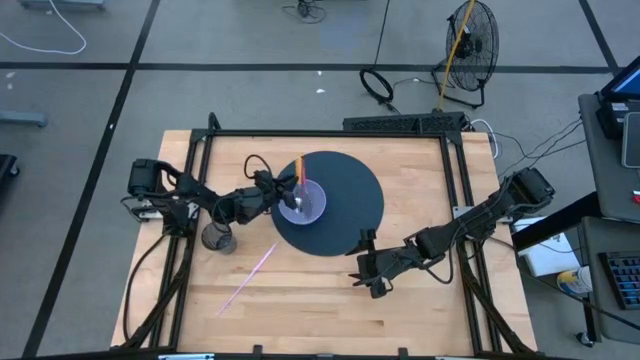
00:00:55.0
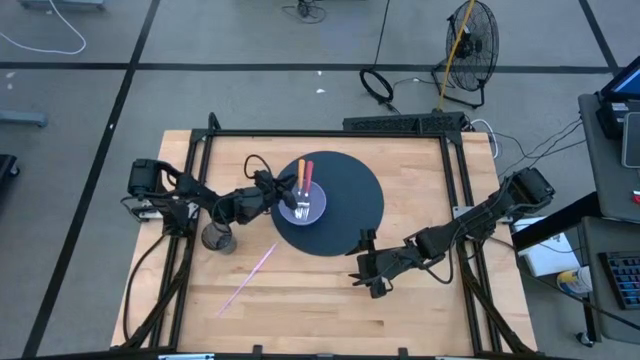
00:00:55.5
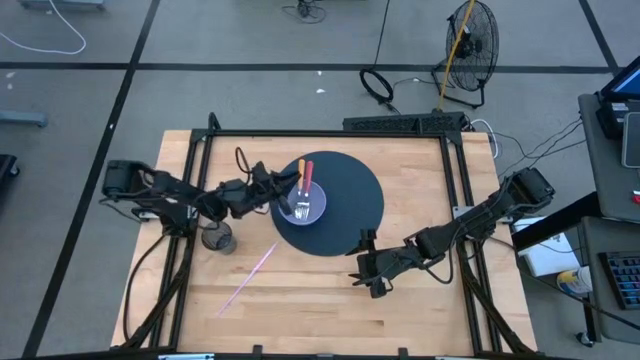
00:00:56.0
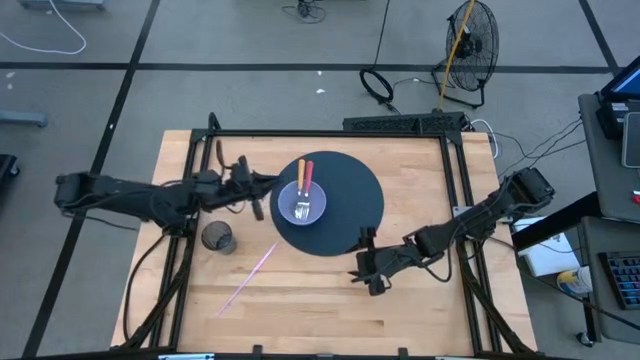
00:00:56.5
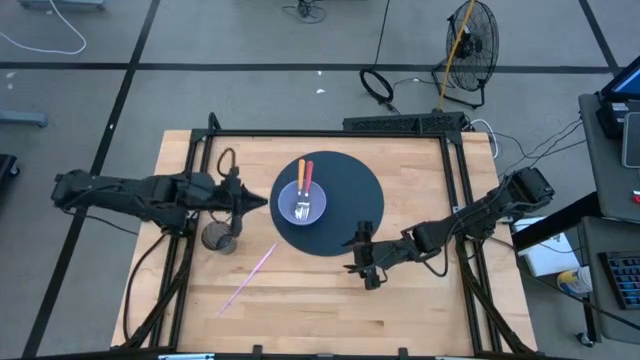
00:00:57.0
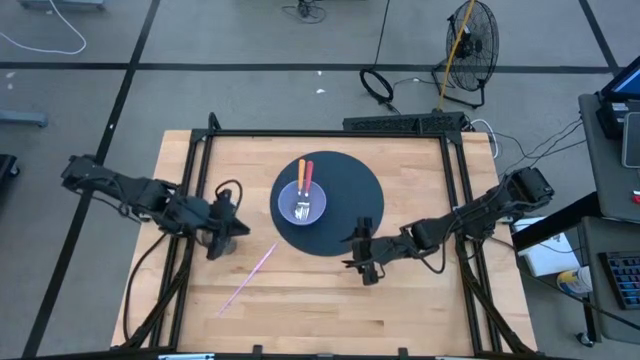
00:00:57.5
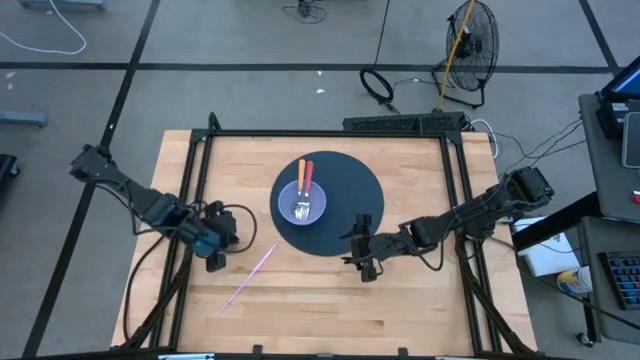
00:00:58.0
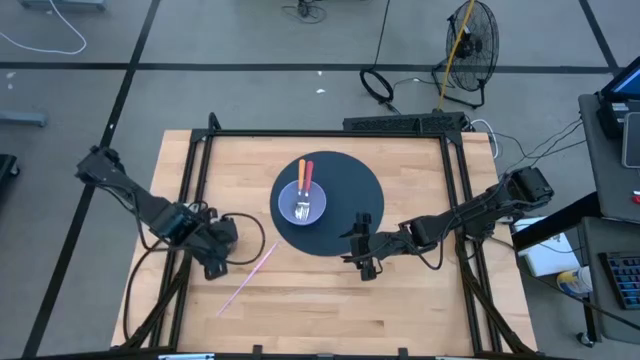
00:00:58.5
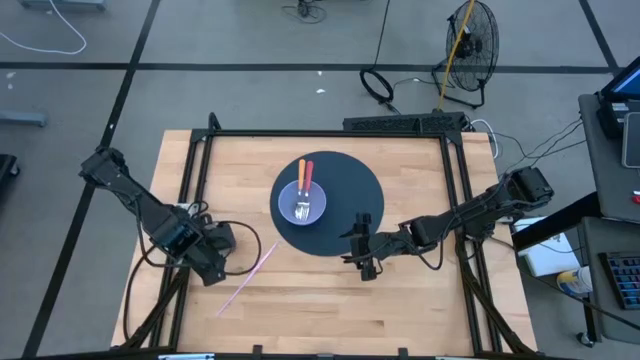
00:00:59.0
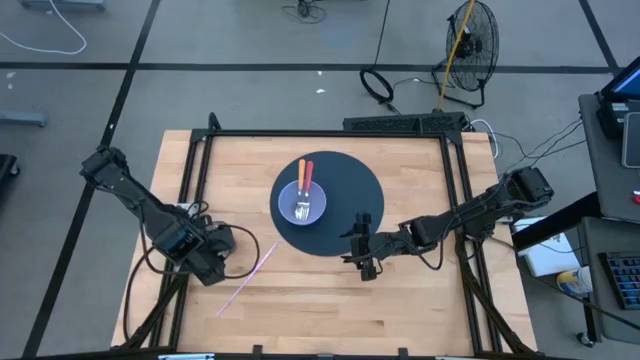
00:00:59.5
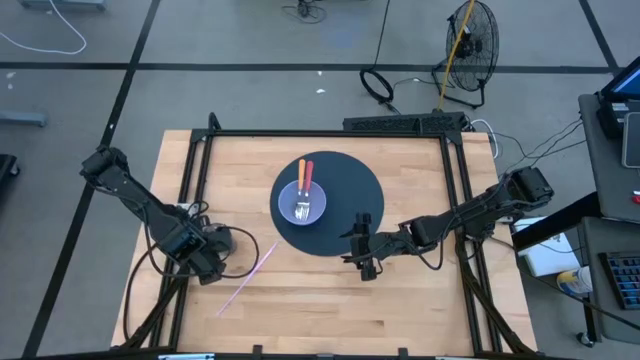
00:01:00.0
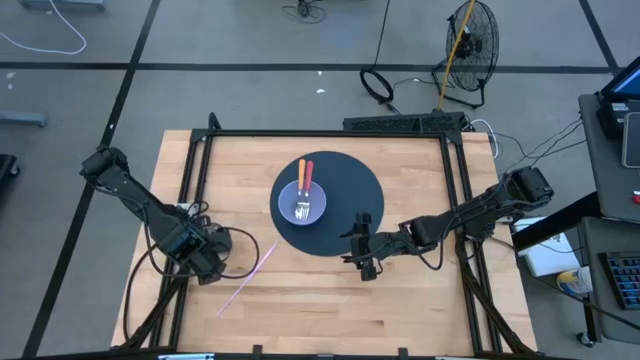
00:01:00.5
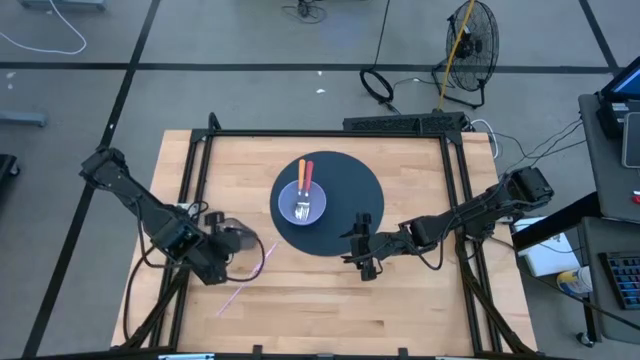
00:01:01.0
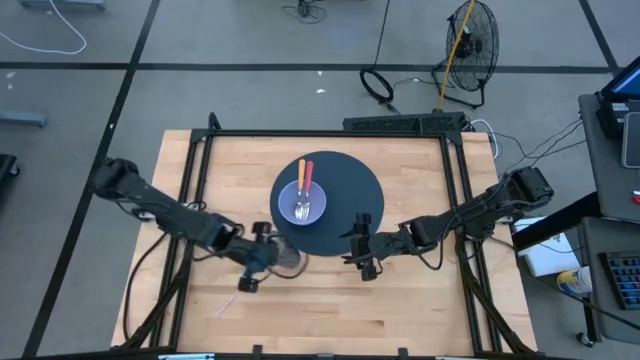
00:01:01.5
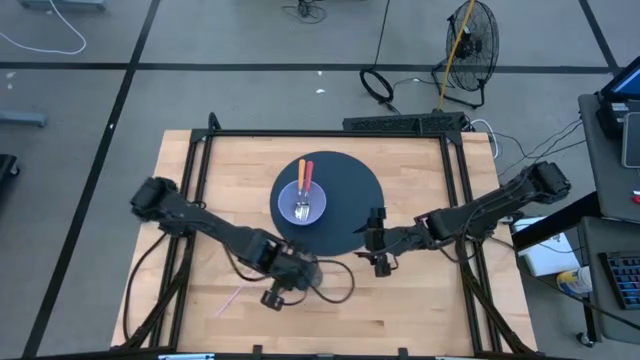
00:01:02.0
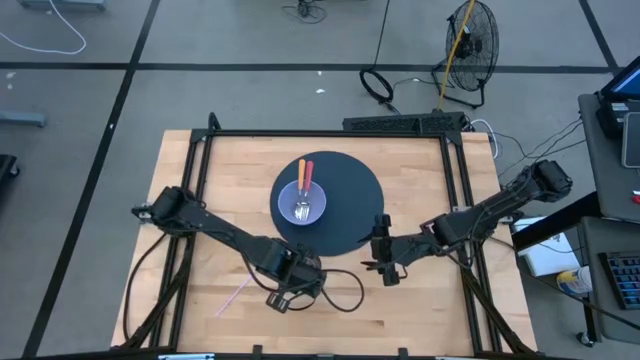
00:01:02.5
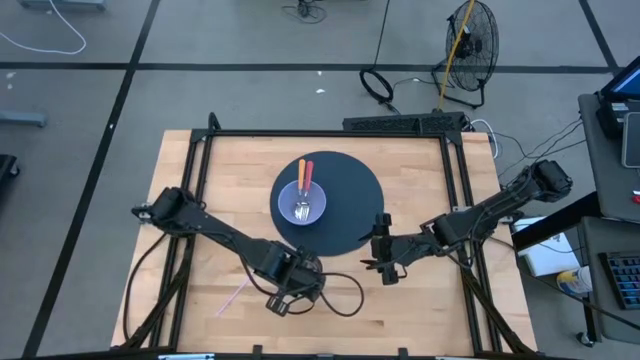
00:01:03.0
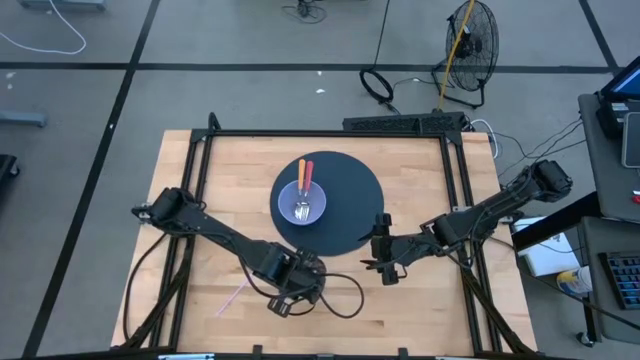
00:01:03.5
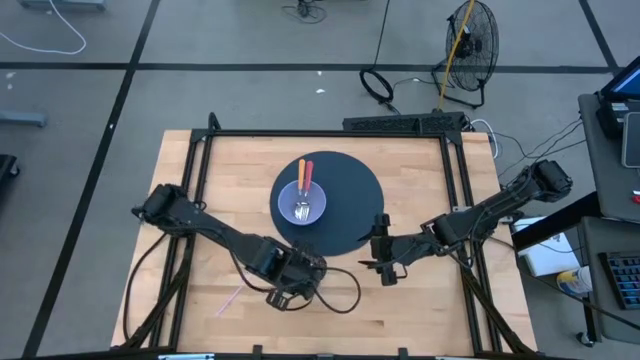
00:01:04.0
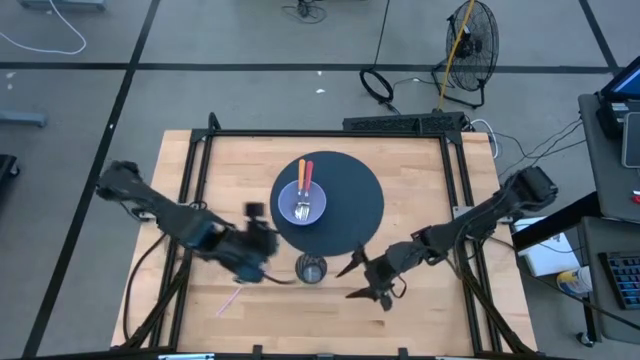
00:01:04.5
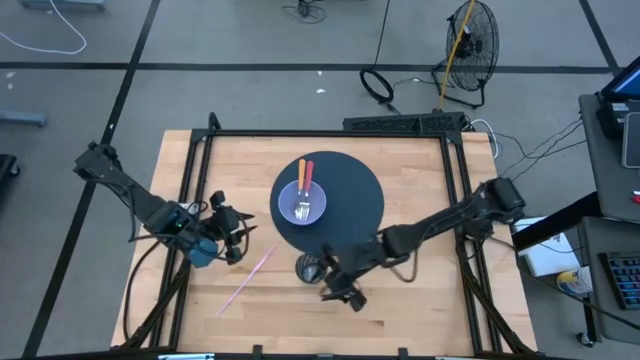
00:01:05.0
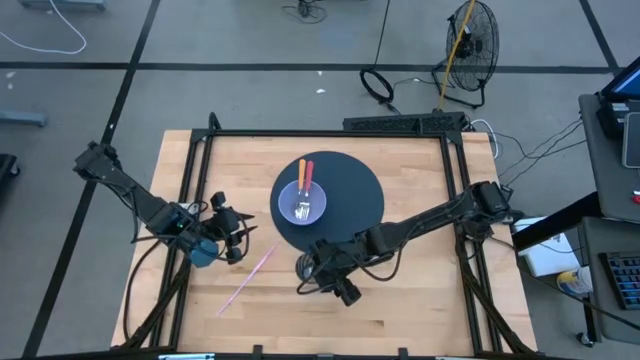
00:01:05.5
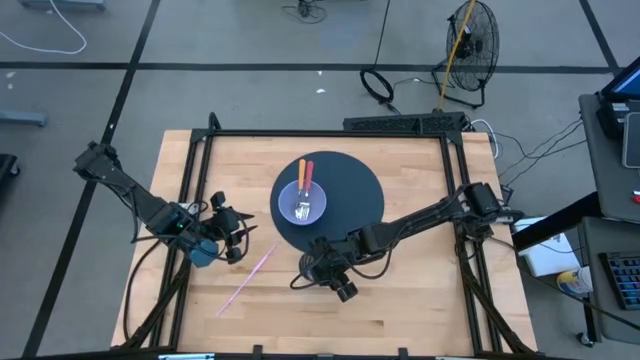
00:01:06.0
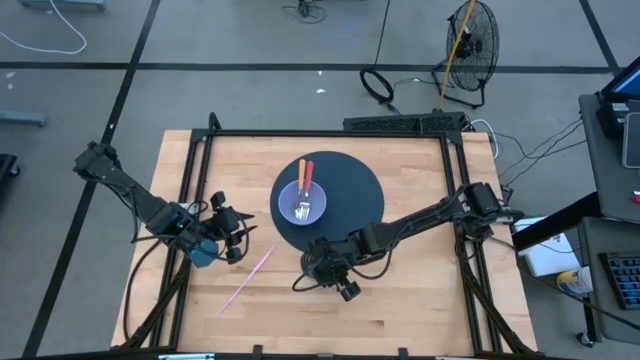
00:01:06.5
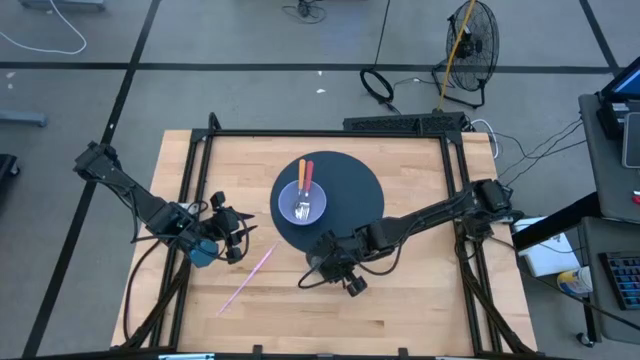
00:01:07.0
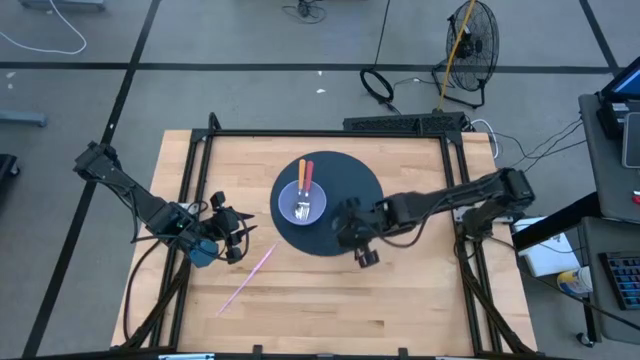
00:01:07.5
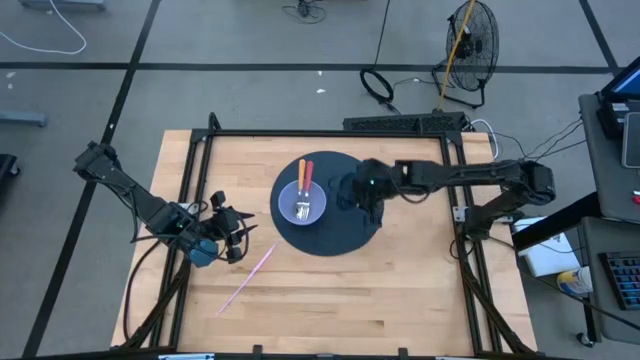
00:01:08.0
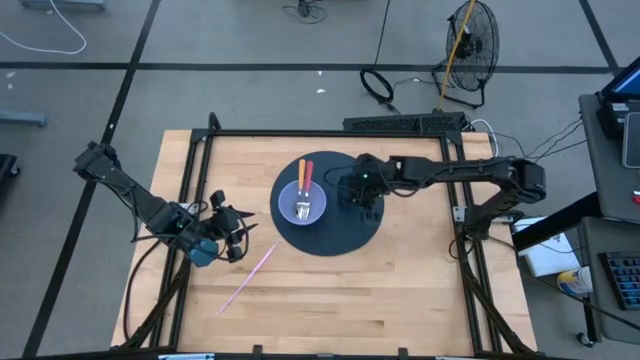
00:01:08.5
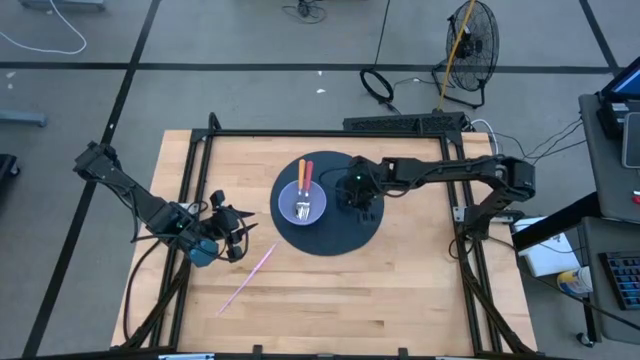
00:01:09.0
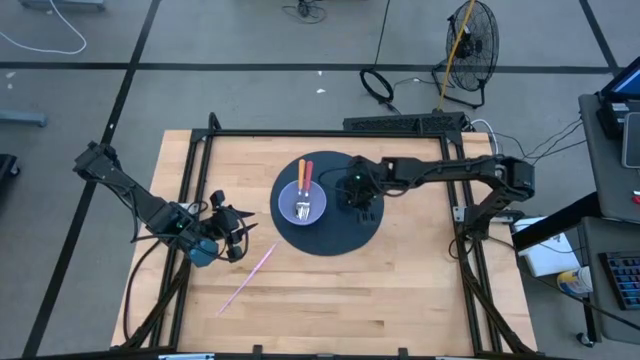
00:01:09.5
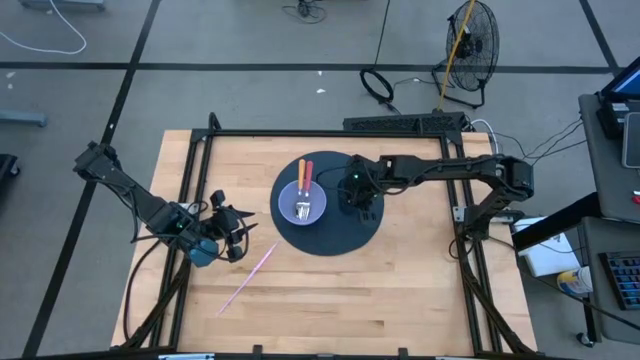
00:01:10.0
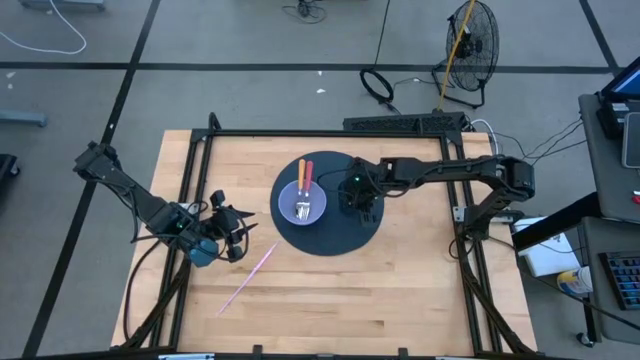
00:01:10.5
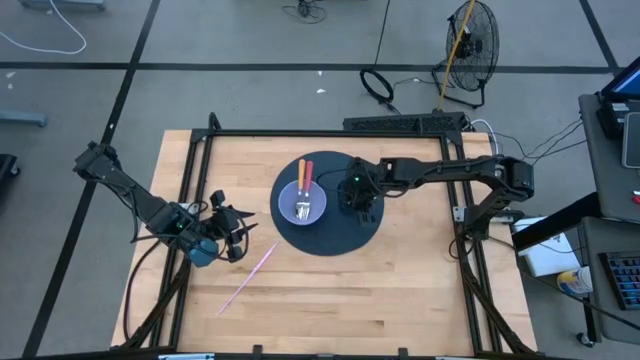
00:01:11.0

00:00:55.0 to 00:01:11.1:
Task: Pick & Place Utensil
Put the blue cup on the mat to the right side of the purple bowl
